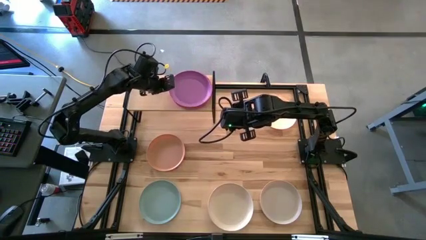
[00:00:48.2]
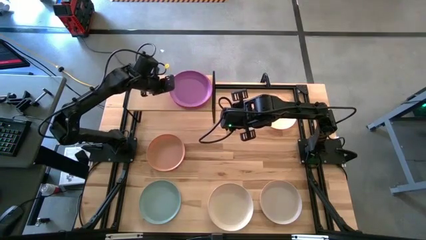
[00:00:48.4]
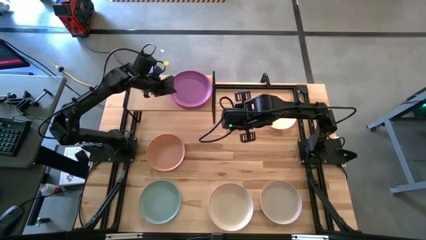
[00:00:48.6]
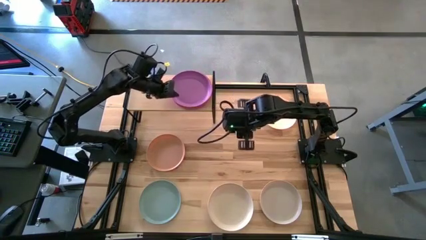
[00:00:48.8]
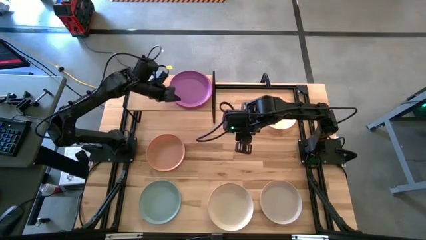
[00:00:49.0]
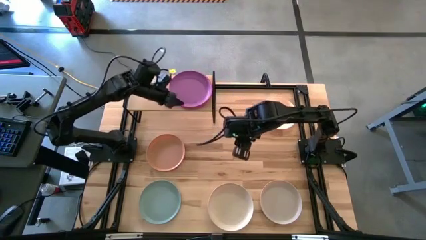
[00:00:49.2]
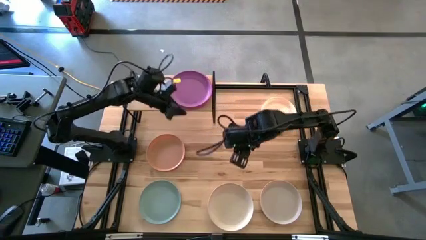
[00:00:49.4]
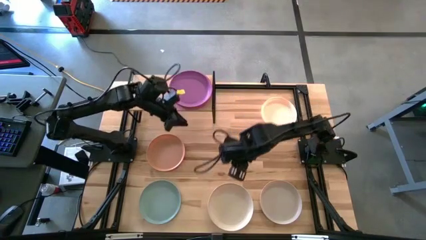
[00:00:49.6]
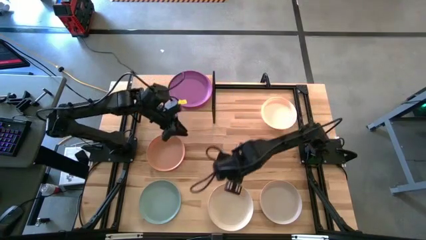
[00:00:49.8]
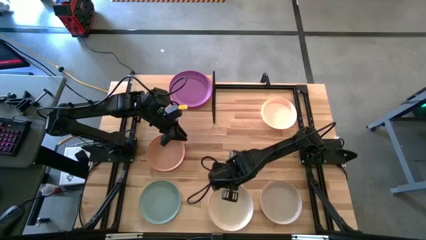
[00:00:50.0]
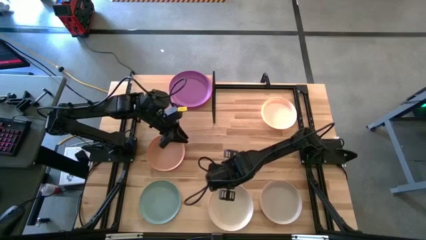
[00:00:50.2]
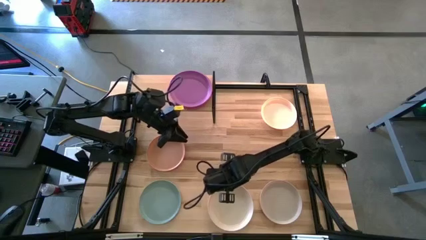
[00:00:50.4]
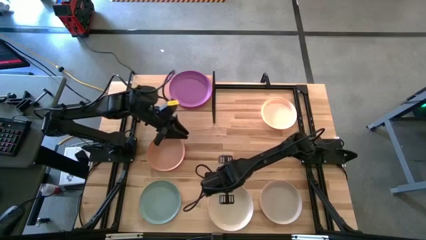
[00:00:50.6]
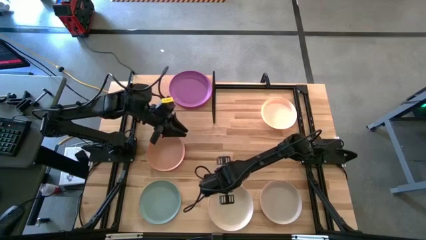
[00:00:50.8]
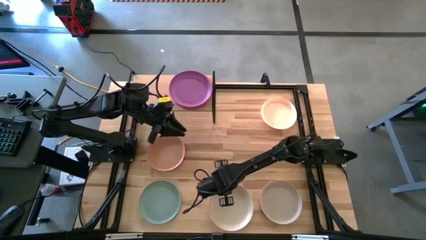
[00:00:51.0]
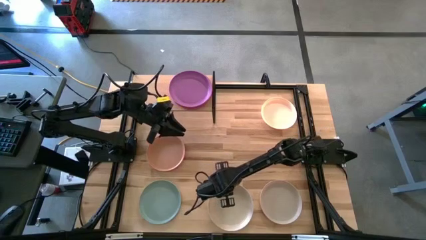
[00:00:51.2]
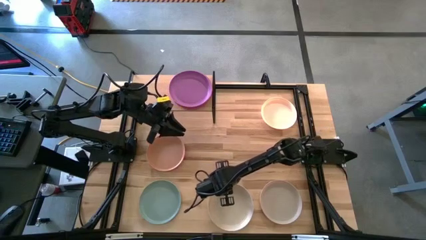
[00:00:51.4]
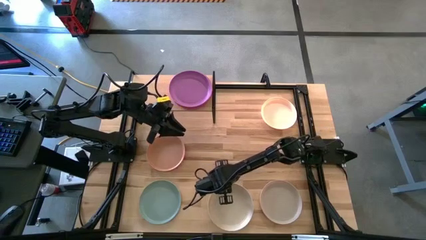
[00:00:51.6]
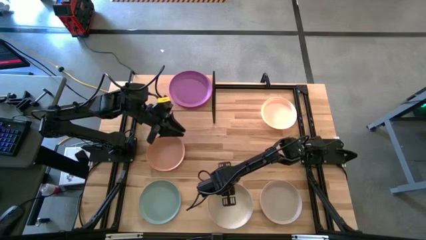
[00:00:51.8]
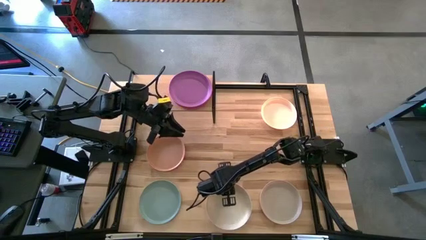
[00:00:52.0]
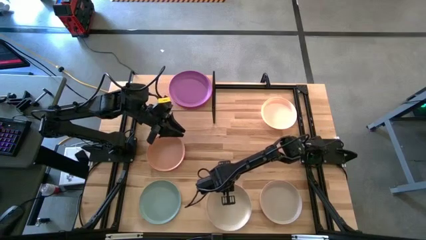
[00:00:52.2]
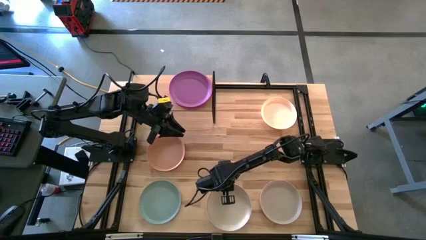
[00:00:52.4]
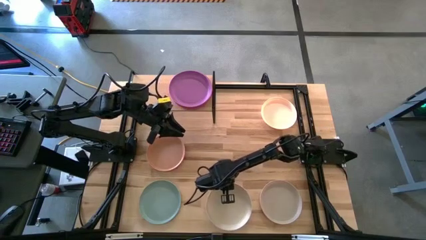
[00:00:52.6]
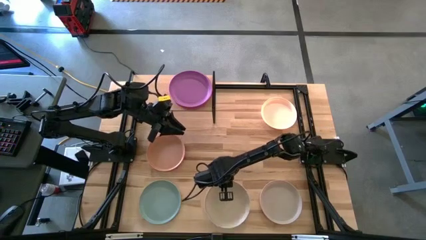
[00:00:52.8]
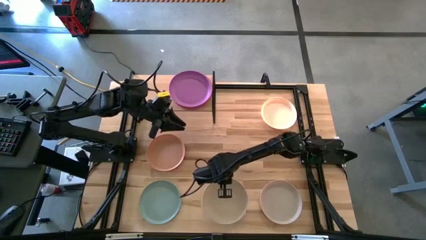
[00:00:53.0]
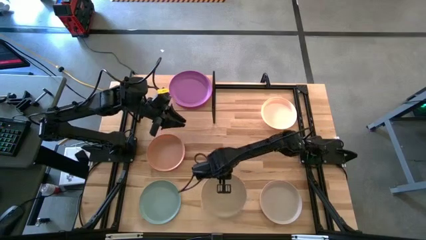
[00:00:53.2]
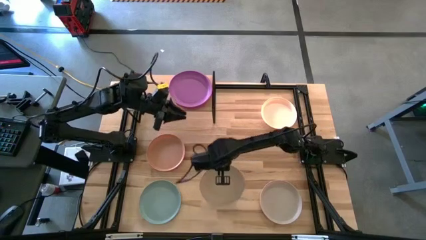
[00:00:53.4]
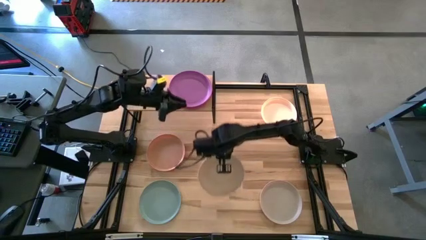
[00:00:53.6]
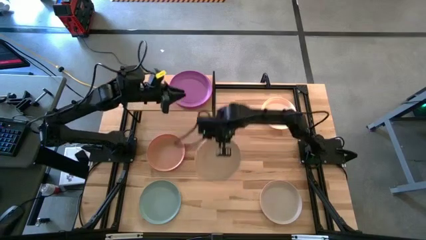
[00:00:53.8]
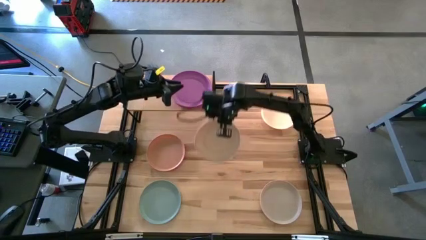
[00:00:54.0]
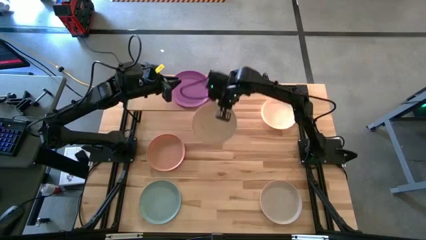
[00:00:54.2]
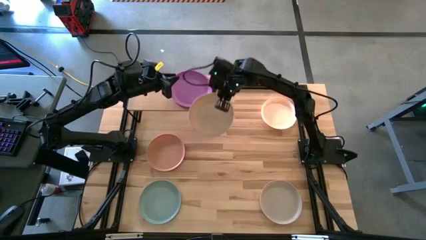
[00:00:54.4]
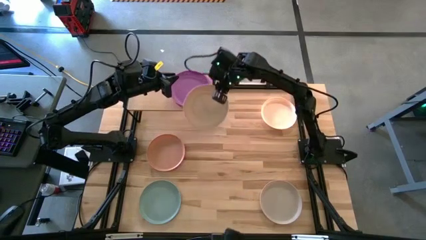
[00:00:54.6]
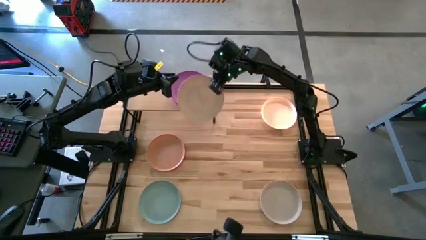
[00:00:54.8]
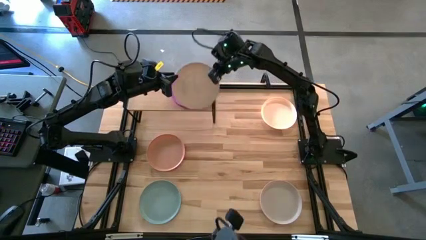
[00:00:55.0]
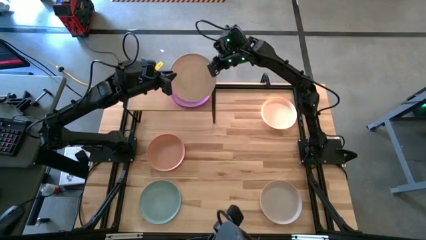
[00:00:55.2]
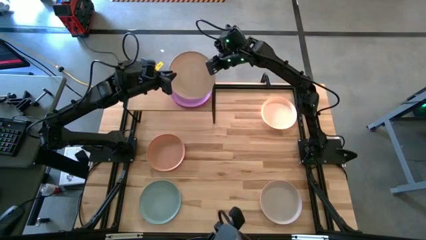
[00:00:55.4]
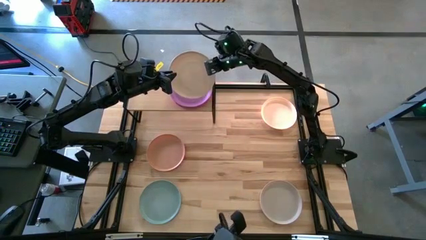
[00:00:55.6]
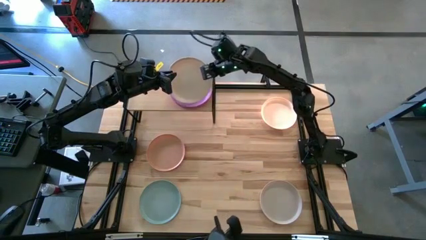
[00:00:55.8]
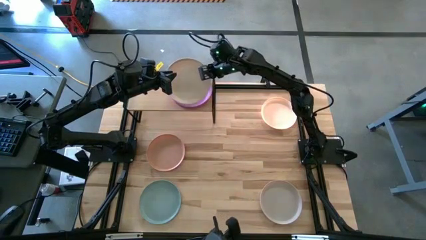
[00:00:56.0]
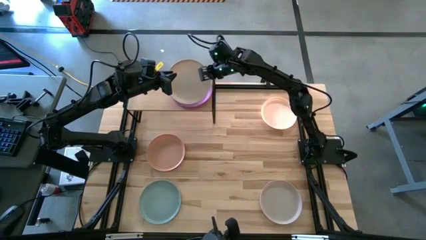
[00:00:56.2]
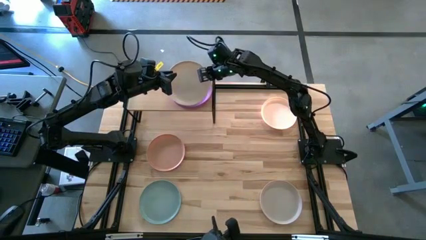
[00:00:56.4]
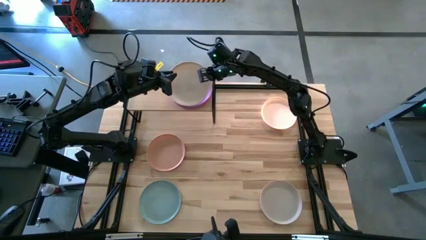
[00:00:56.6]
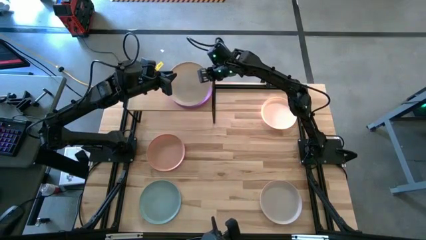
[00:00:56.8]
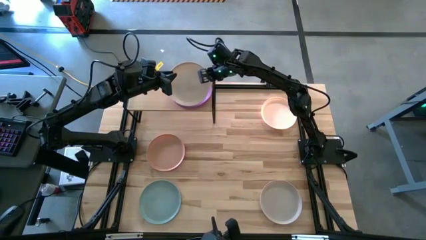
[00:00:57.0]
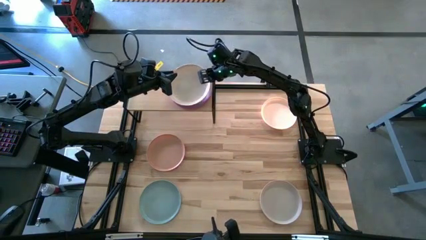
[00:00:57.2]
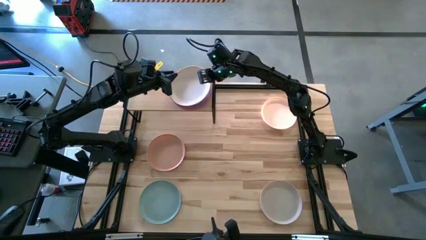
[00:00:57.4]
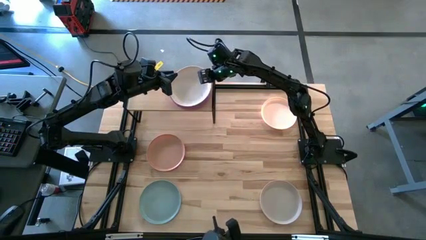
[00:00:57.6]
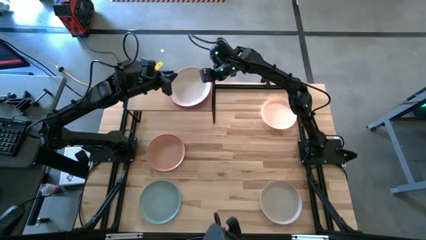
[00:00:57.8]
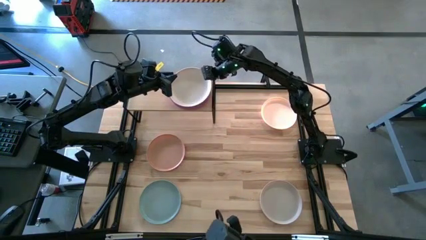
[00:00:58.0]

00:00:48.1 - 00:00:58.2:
Task: Place and stack plates onto a shelf
Stack the bottom left white plate on top of the purple plate

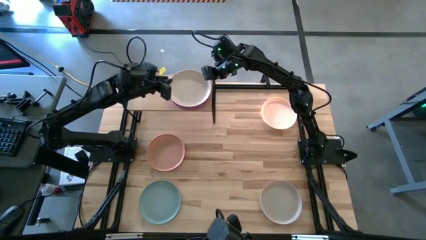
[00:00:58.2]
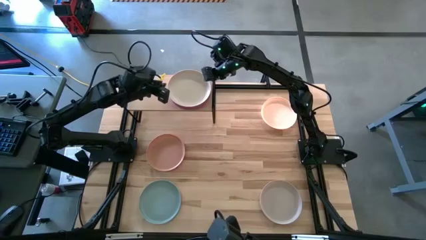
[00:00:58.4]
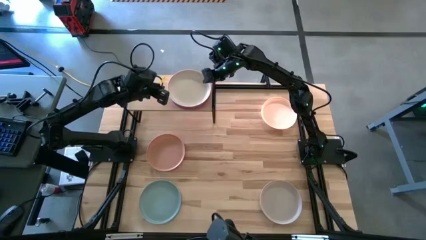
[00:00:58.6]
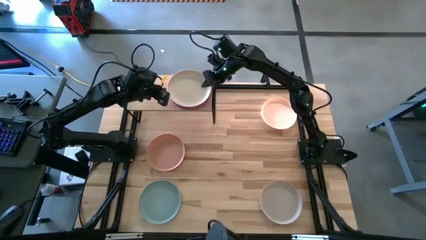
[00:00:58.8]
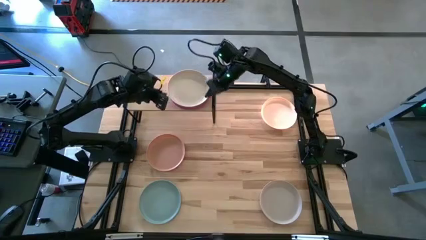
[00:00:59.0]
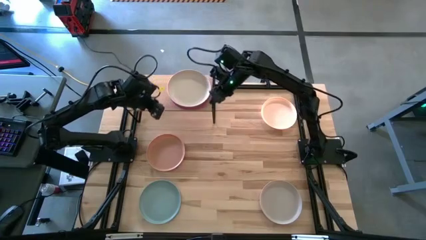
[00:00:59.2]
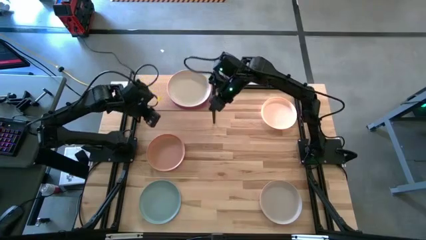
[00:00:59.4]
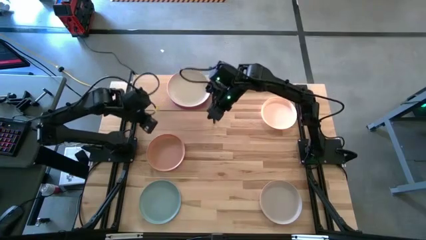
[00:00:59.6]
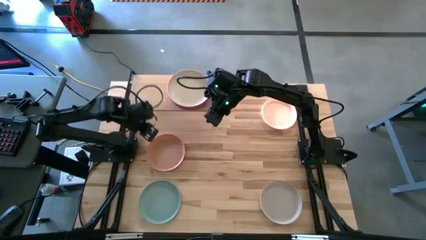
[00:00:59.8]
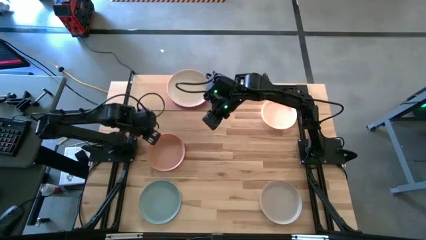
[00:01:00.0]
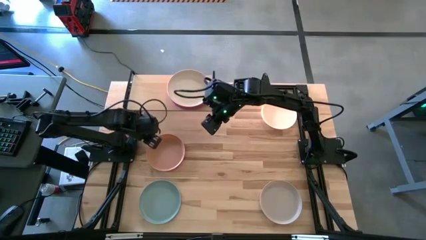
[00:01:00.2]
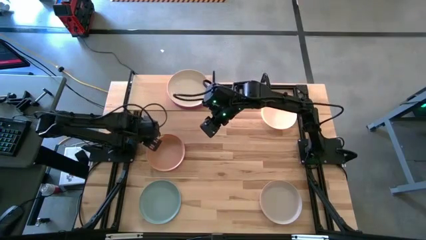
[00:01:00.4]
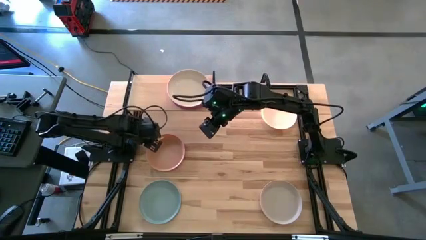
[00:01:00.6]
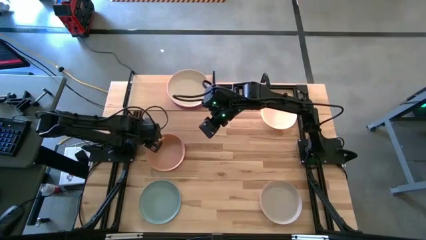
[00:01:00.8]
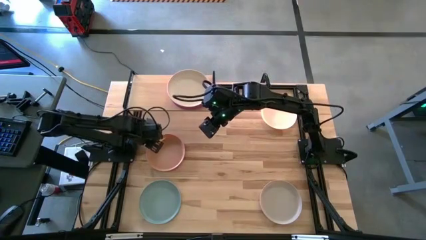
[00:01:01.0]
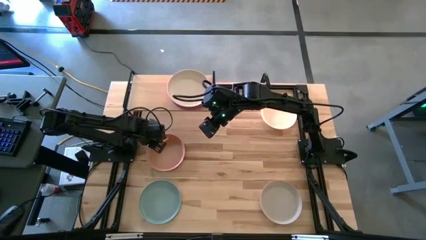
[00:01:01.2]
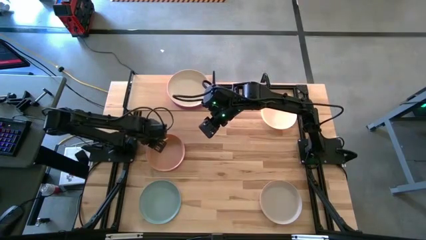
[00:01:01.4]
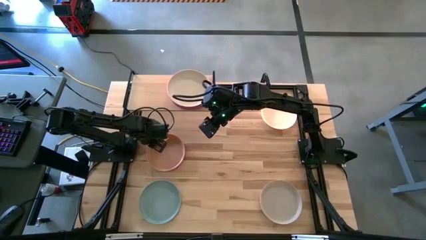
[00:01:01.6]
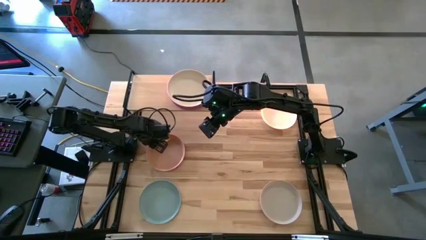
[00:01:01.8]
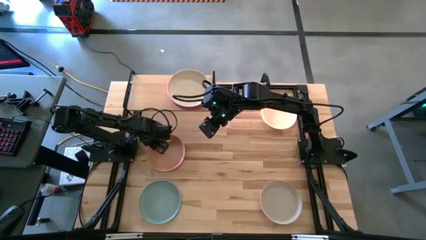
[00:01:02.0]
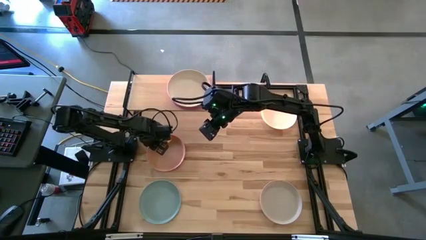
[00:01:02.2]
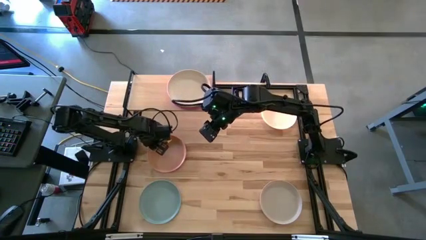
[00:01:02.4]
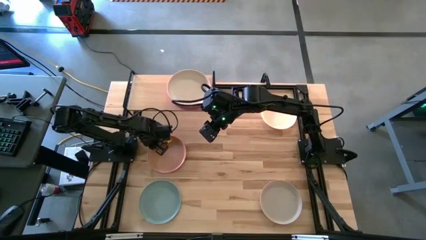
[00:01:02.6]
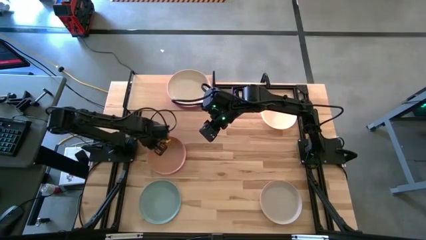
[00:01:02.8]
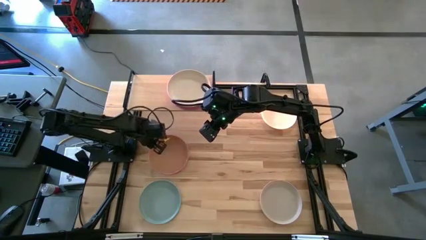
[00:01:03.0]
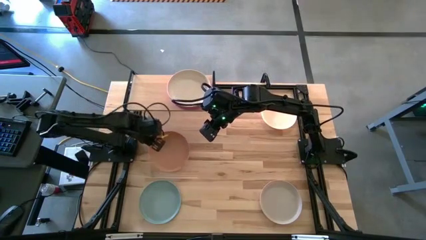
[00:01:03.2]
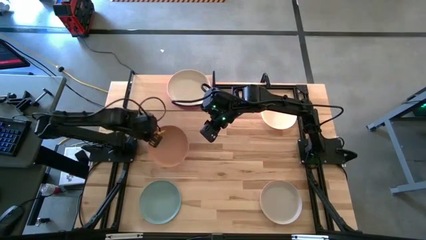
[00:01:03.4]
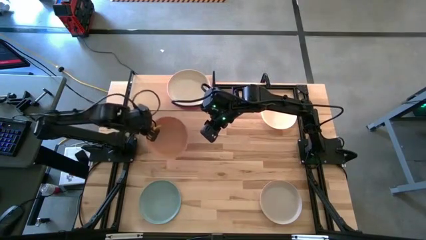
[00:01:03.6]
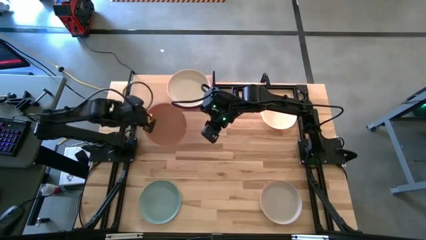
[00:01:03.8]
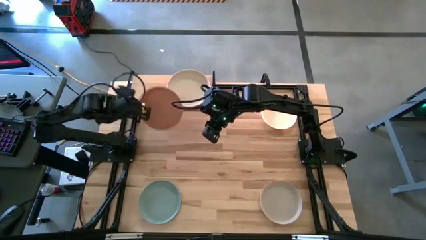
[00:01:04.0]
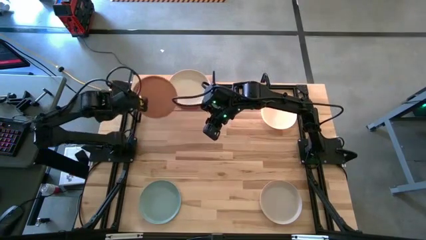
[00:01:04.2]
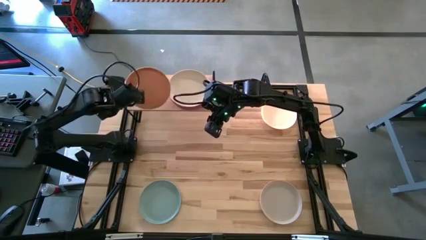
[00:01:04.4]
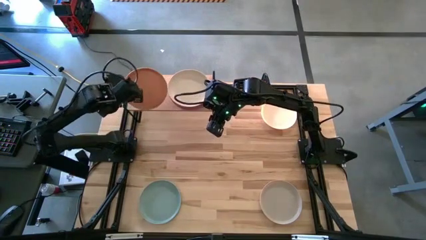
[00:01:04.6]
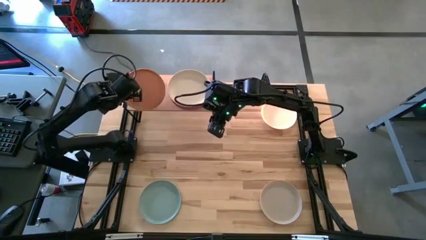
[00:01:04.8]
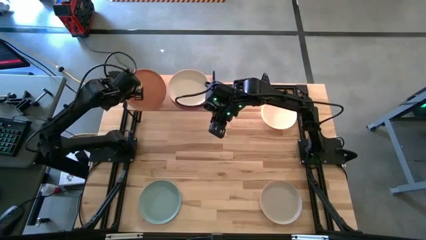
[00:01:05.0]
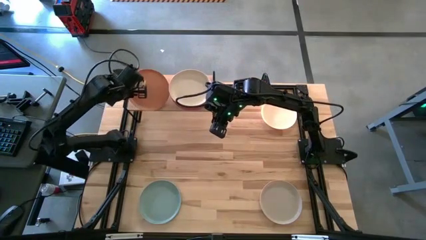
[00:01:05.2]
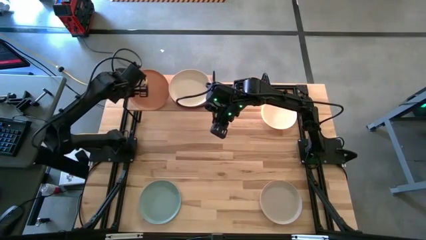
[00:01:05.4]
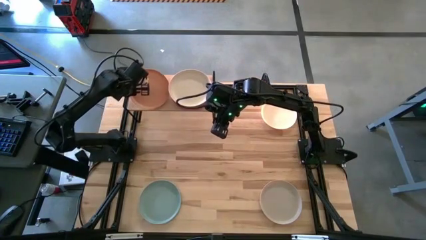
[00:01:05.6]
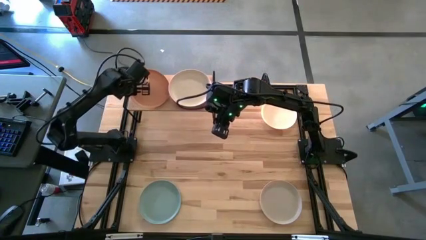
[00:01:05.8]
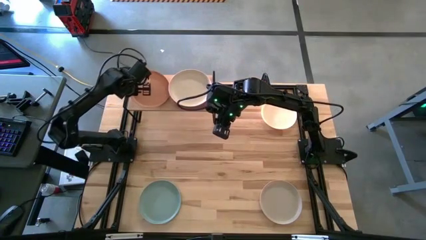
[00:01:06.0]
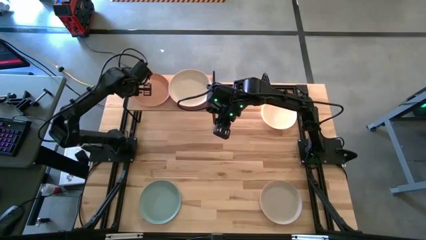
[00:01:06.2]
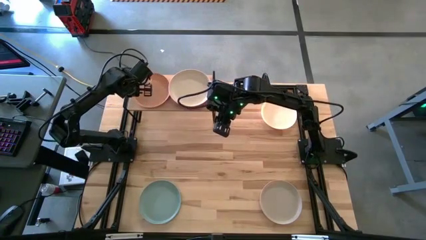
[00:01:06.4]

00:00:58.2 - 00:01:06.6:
Put the light orange plate on the shelf
